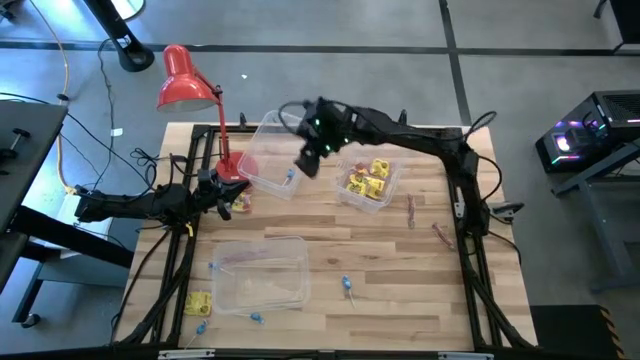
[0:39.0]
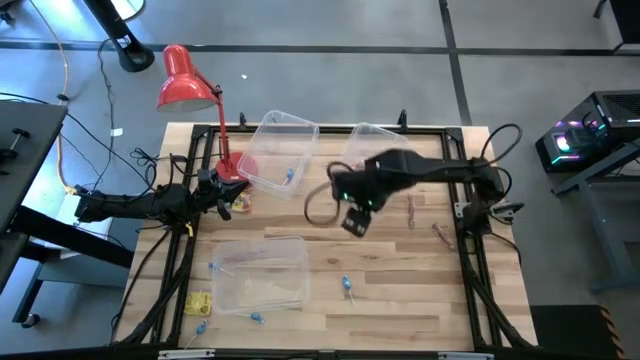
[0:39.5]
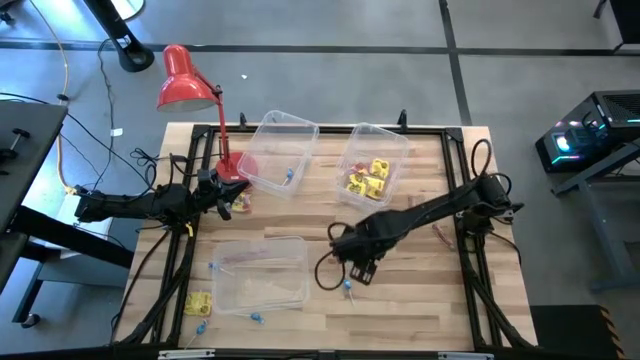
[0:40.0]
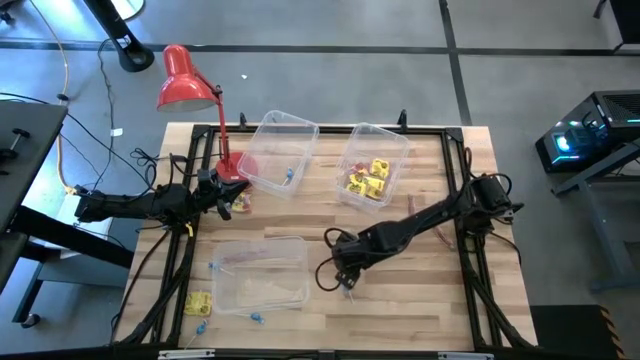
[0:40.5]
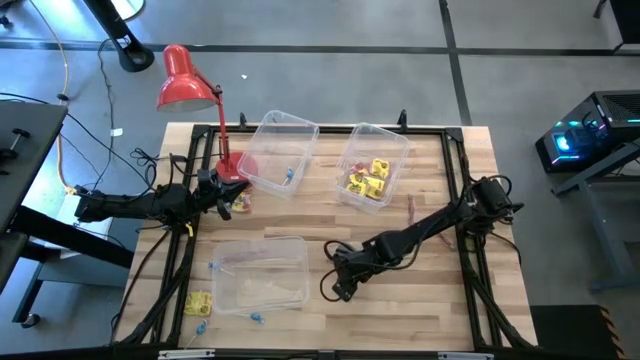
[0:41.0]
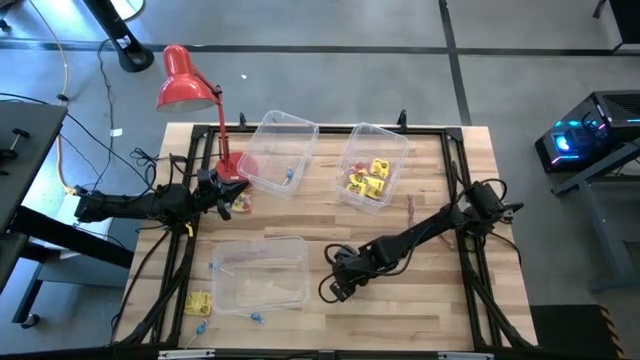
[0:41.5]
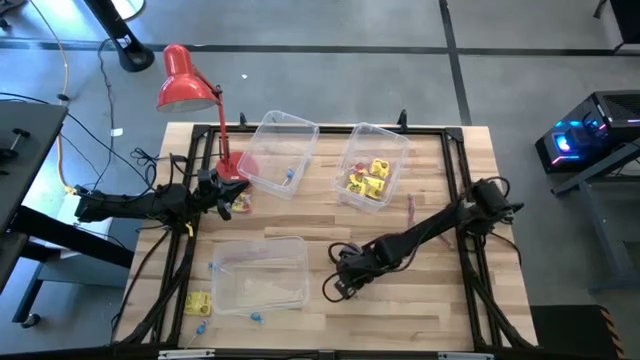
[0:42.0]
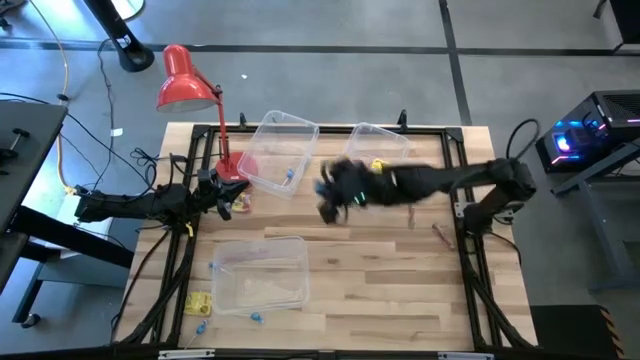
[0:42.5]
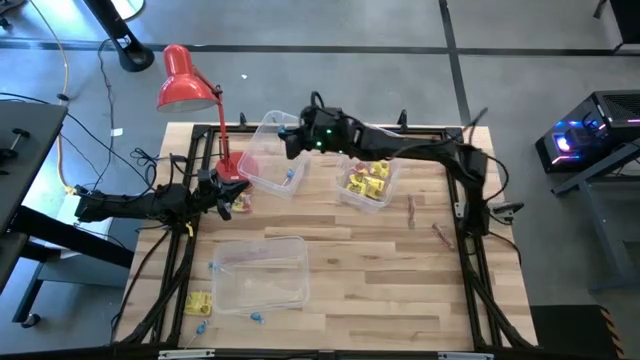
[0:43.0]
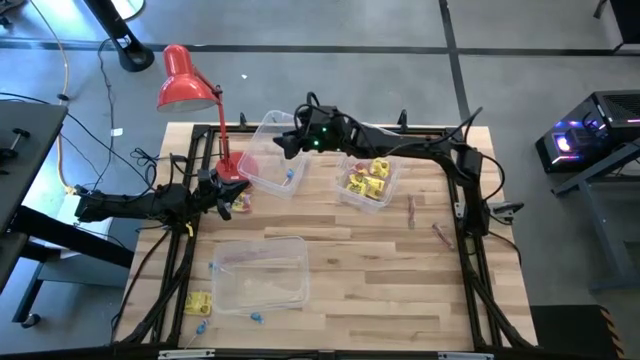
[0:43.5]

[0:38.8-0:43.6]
Task: Sort candy
Put the blue lollipop into the top left transparent bin

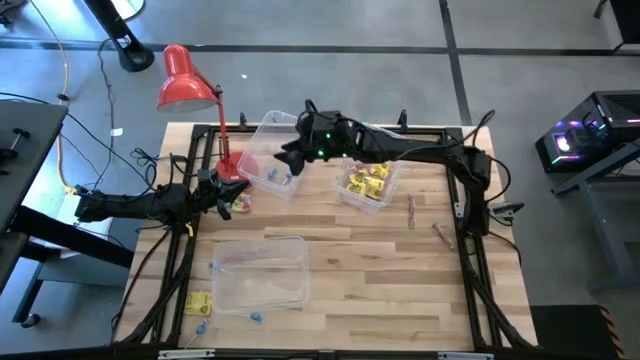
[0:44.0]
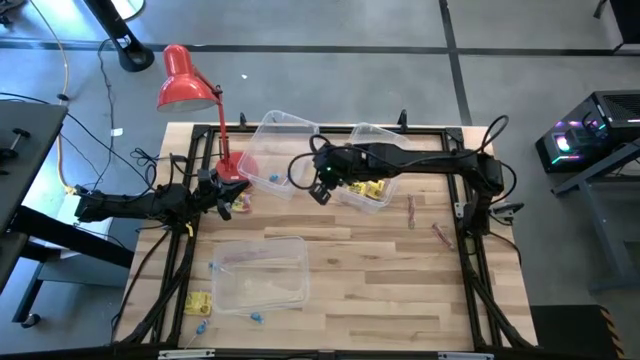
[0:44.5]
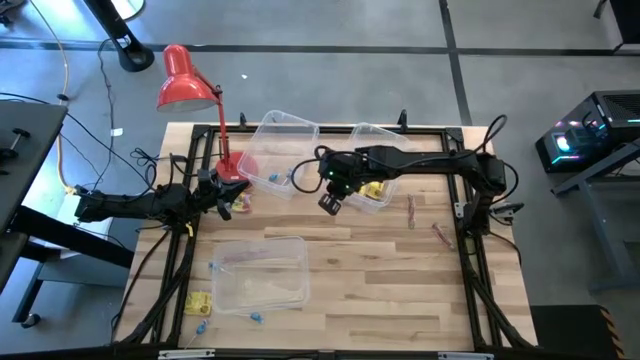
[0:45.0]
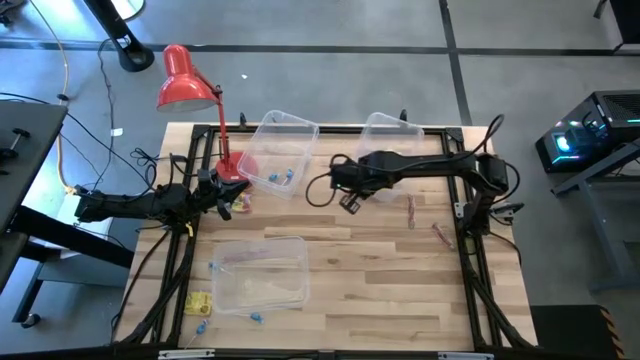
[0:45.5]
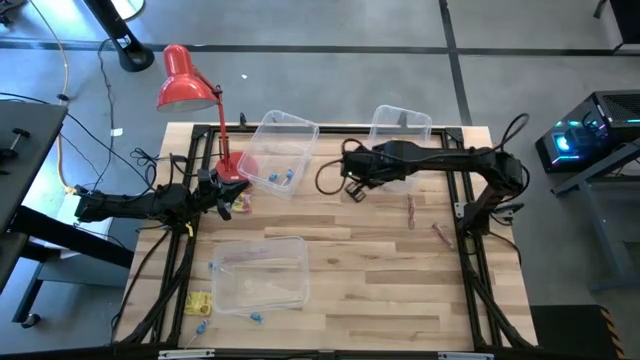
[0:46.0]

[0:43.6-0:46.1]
Adjust the top right transparent bin

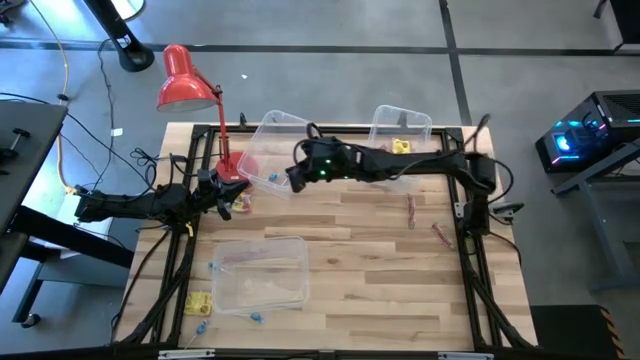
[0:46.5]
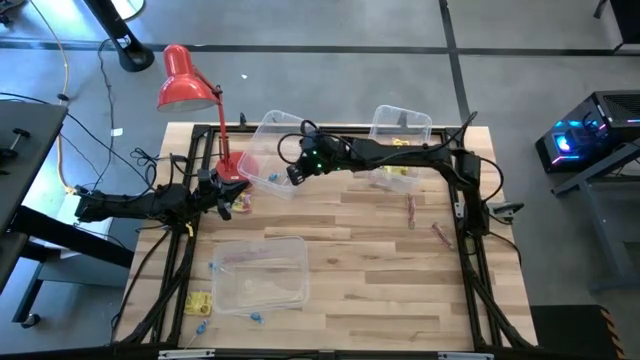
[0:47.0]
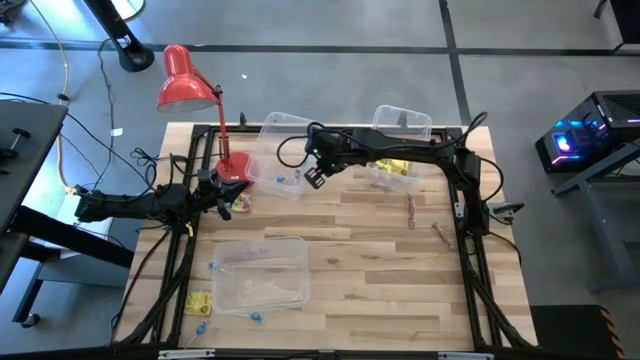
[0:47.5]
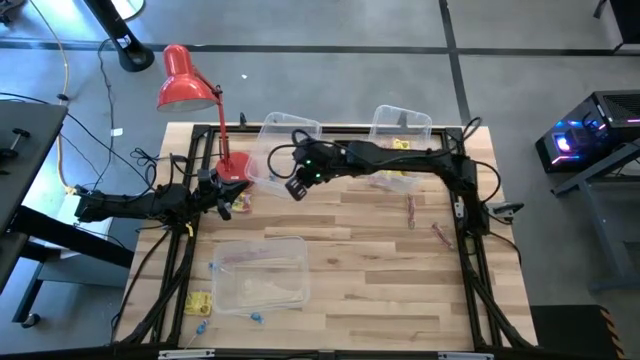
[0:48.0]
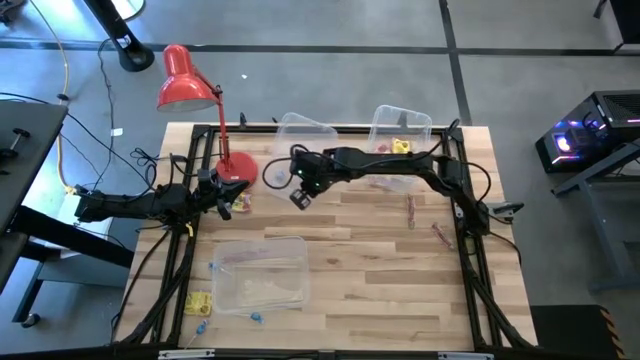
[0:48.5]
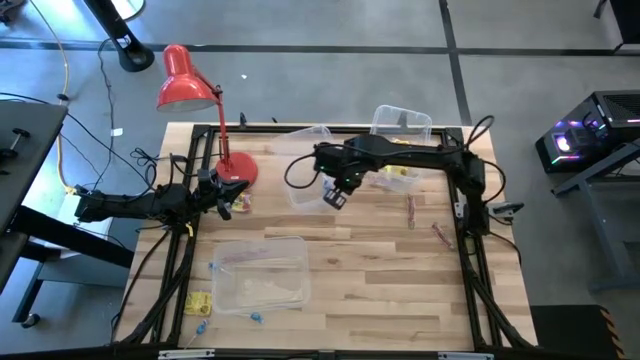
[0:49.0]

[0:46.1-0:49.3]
Adjust the top left transparent bin

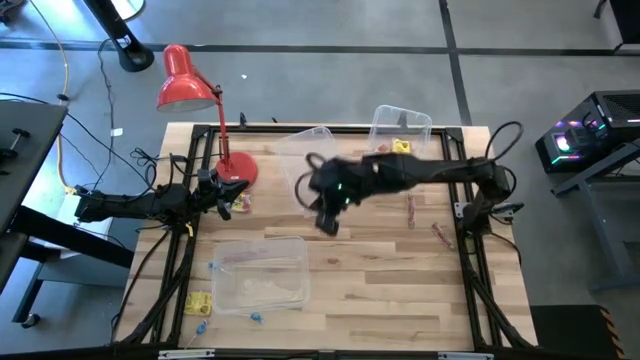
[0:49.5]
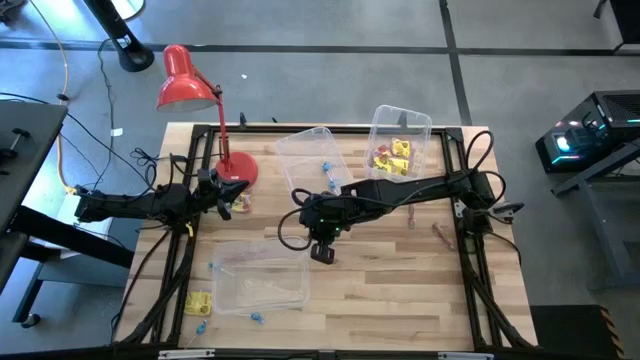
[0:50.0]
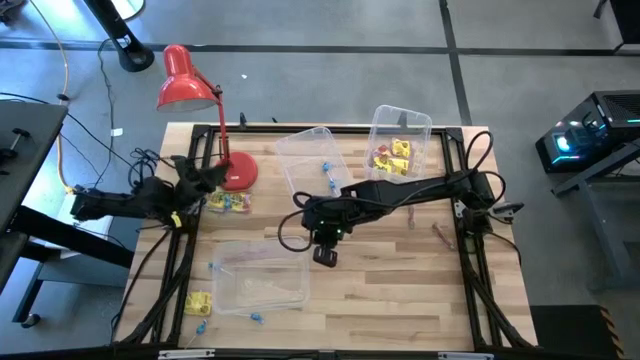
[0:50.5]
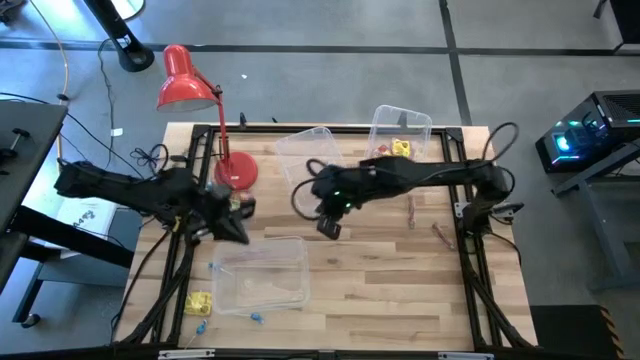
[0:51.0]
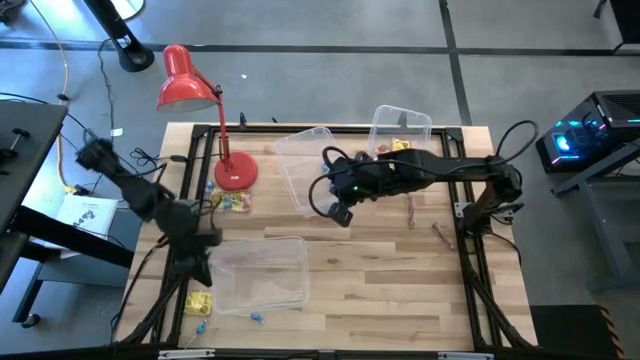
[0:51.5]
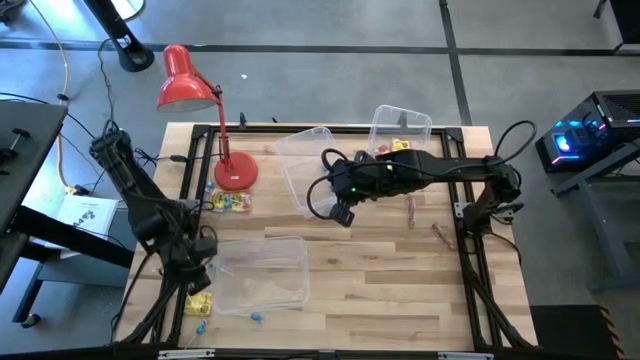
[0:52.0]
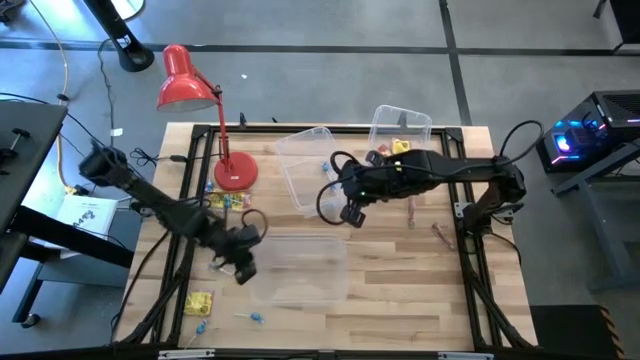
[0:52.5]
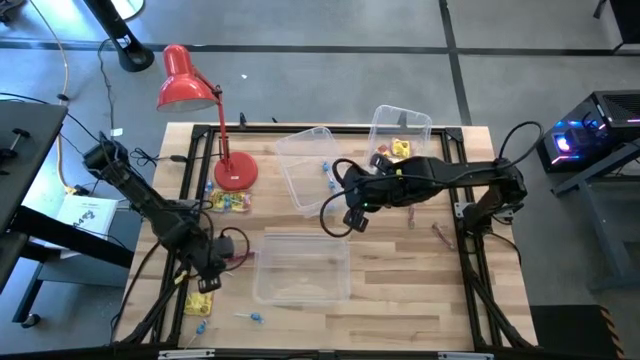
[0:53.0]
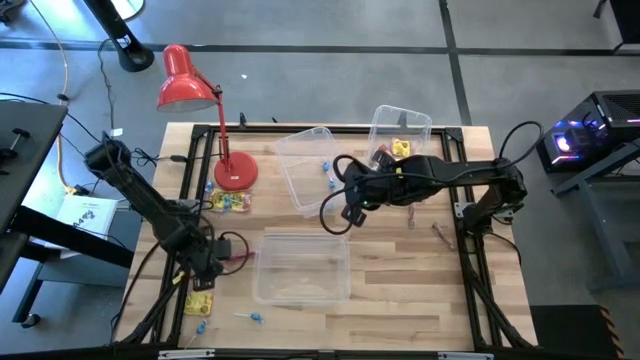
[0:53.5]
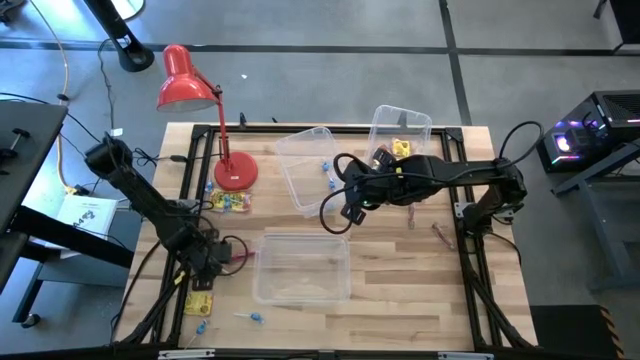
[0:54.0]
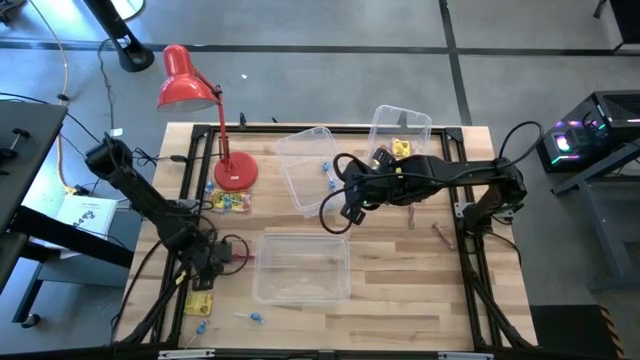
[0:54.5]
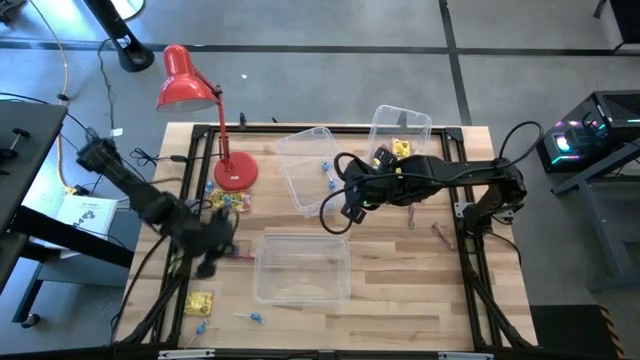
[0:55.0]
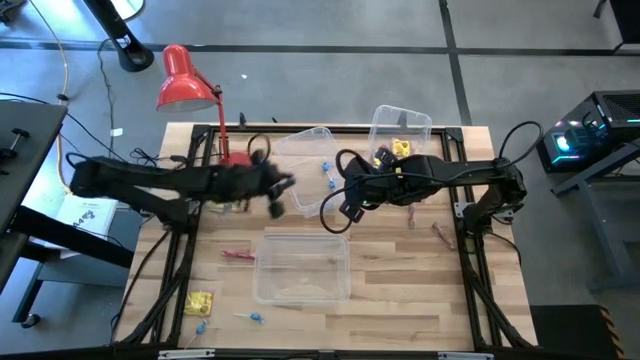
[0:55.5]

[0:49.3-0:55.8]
Put the blue lollipop into the top left transparent bin

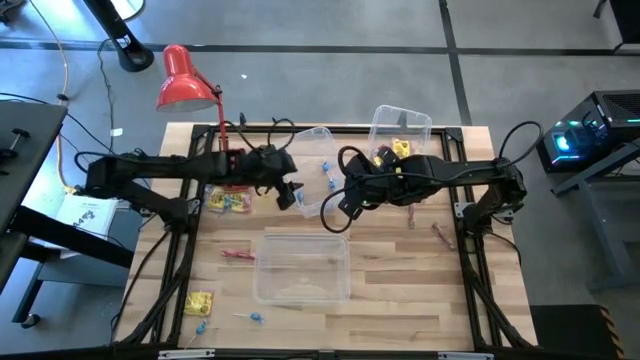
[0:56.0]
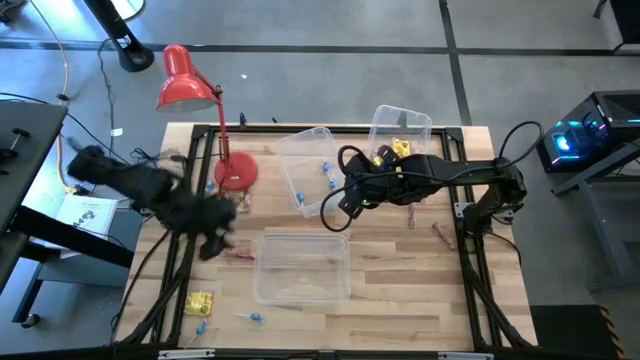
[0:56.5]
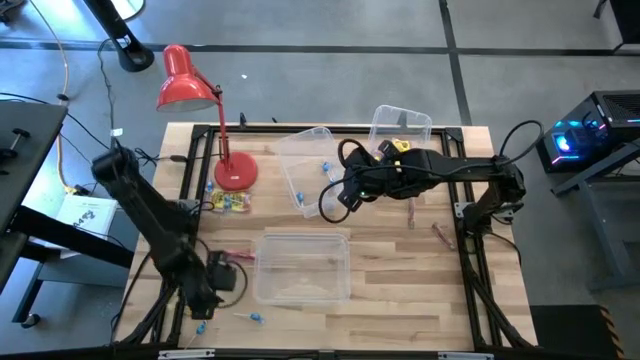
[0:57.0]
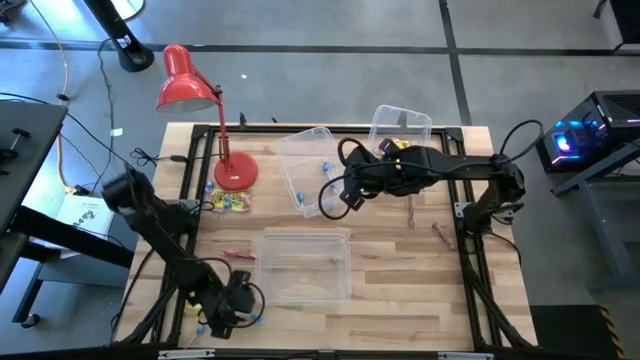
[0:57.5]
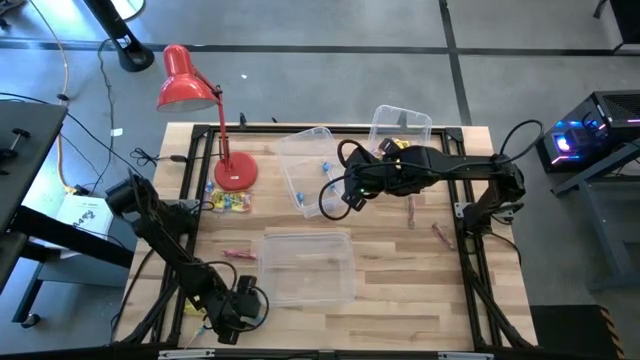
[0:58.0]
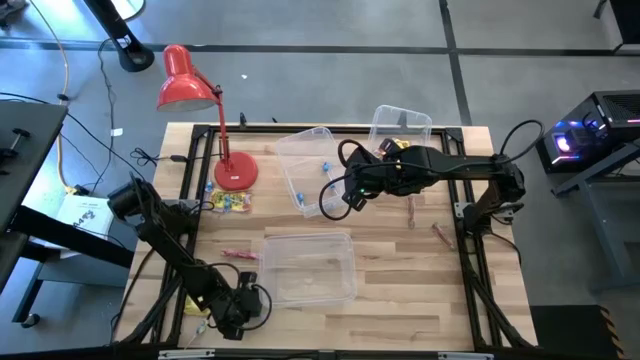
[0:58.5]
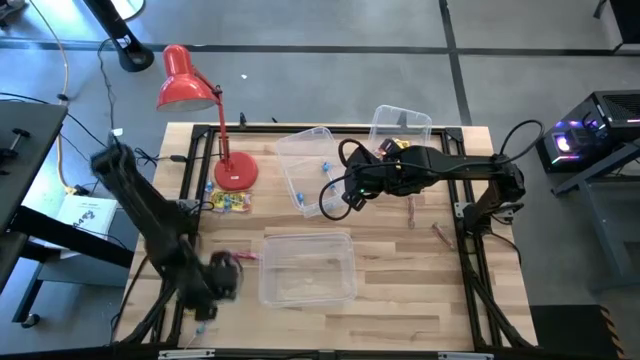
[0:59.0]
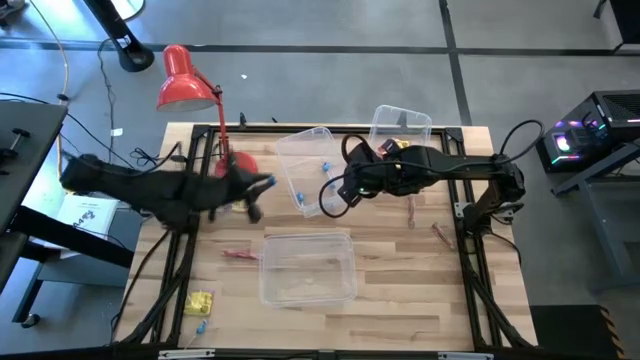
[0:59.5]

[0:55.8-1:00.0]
Put the blue lollipop into the top left transparent bin
